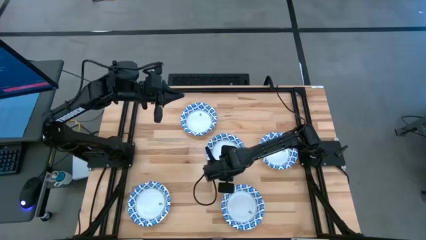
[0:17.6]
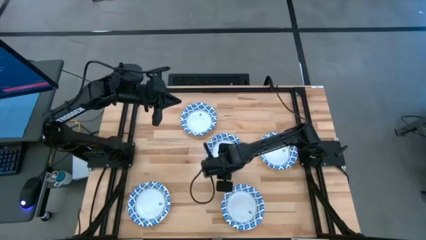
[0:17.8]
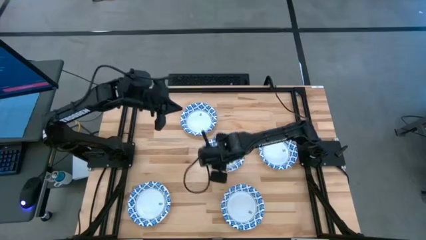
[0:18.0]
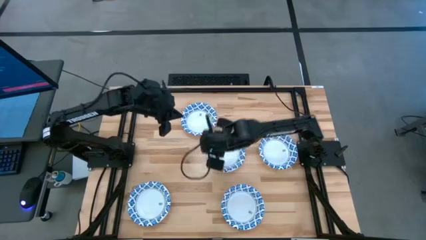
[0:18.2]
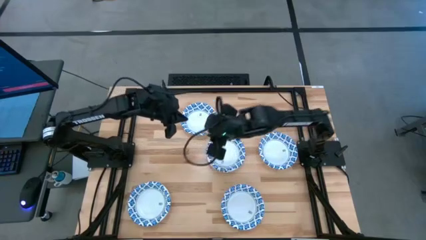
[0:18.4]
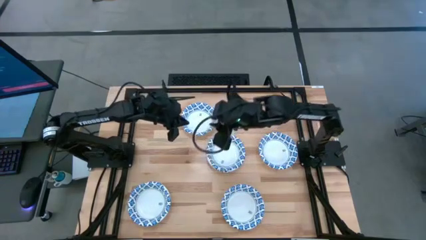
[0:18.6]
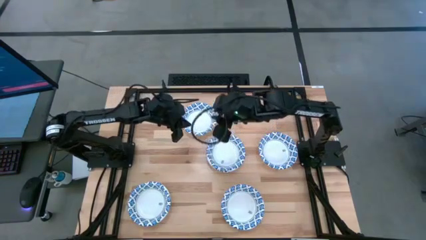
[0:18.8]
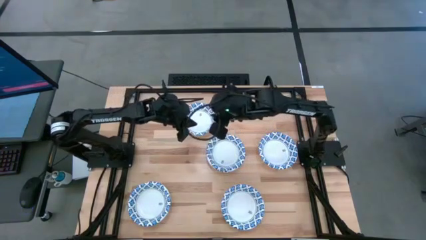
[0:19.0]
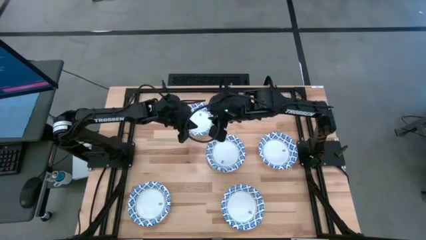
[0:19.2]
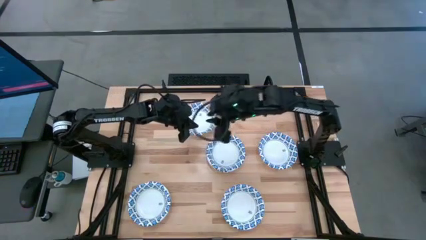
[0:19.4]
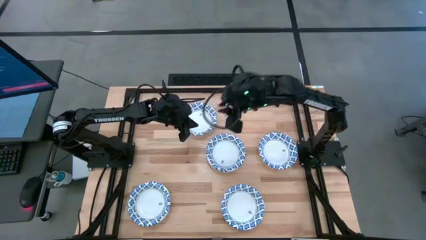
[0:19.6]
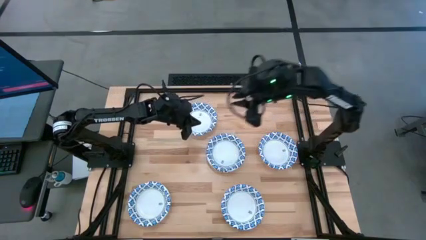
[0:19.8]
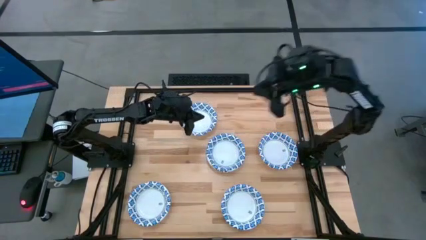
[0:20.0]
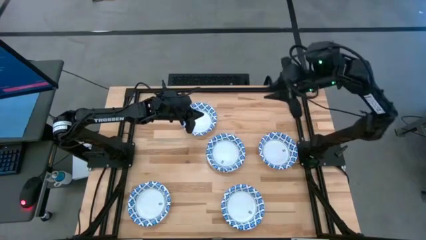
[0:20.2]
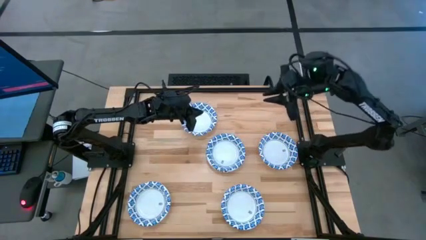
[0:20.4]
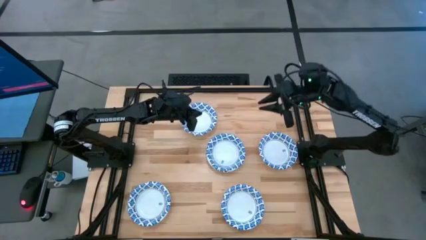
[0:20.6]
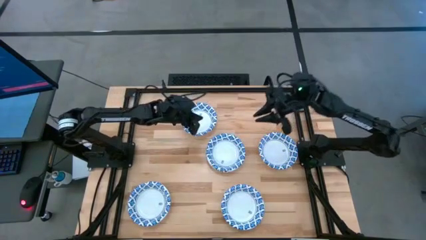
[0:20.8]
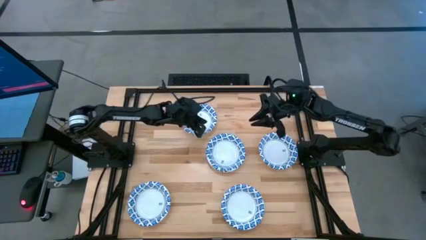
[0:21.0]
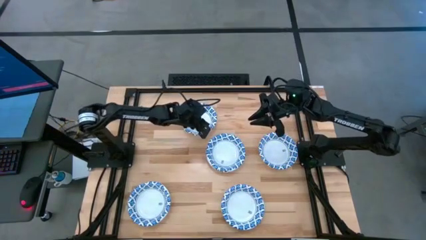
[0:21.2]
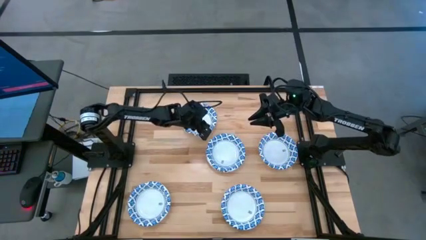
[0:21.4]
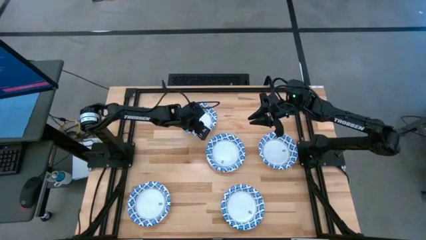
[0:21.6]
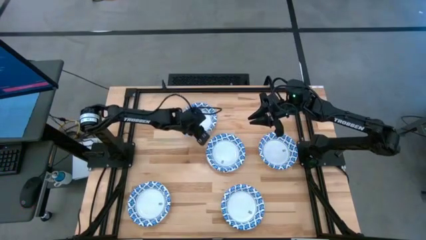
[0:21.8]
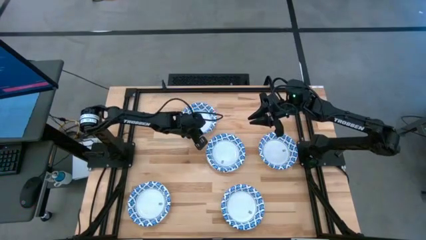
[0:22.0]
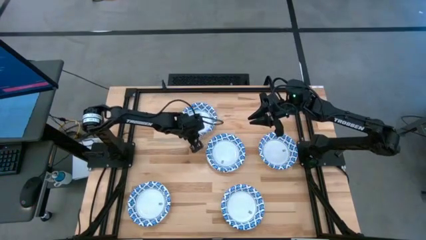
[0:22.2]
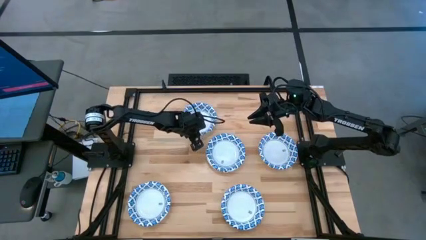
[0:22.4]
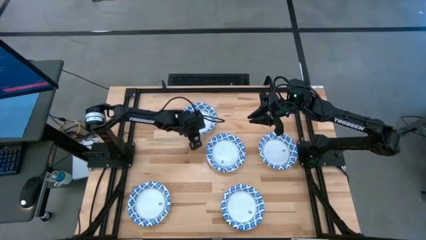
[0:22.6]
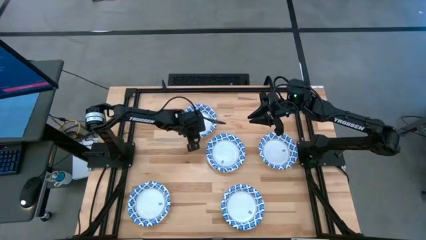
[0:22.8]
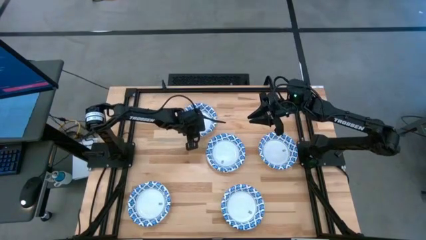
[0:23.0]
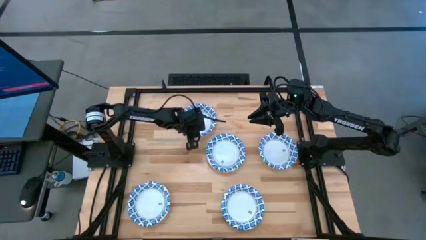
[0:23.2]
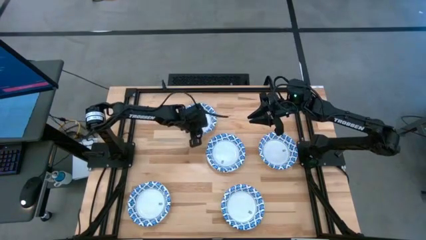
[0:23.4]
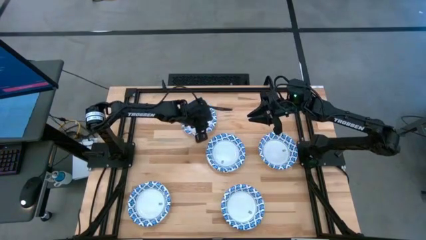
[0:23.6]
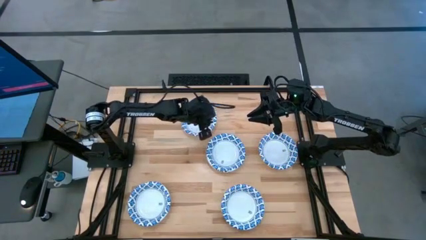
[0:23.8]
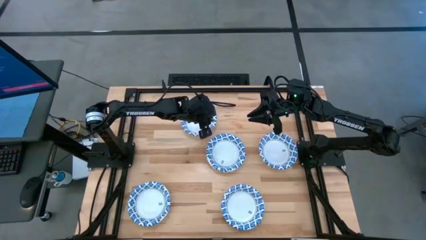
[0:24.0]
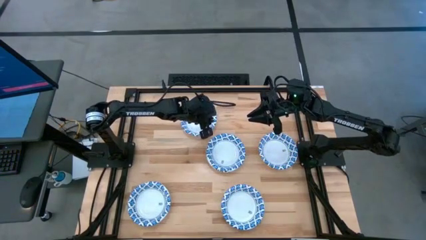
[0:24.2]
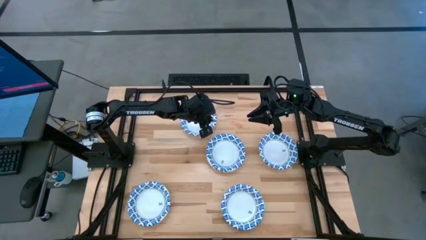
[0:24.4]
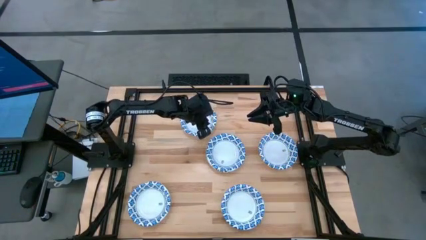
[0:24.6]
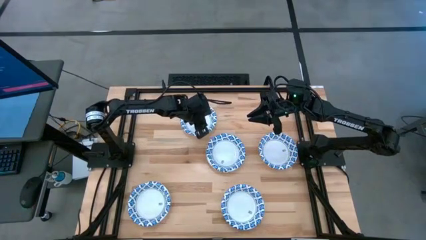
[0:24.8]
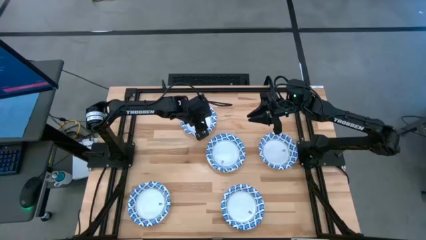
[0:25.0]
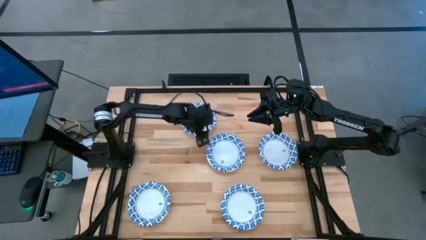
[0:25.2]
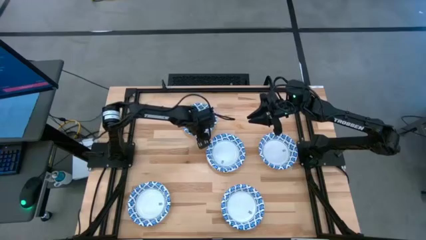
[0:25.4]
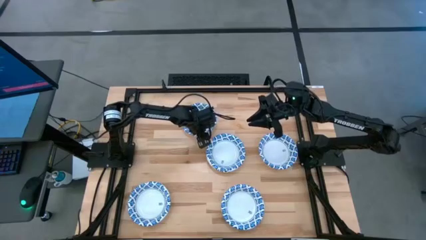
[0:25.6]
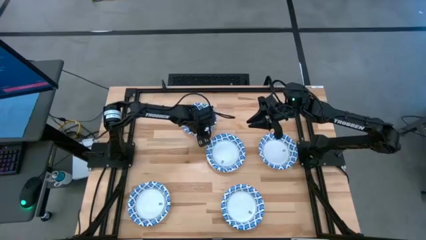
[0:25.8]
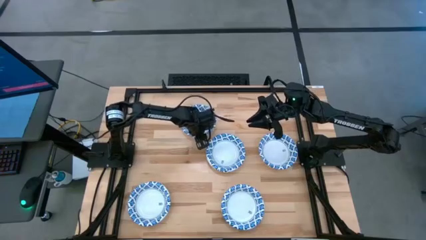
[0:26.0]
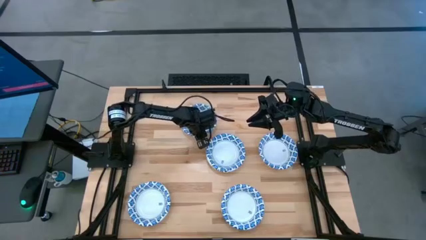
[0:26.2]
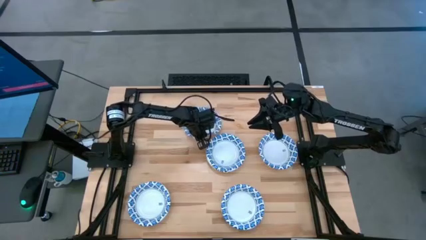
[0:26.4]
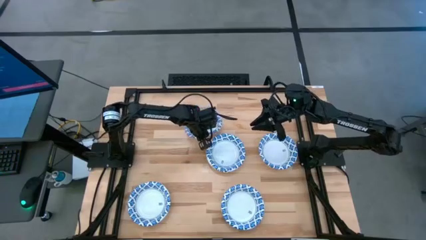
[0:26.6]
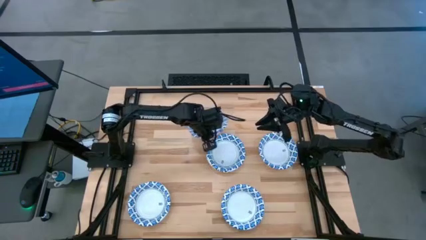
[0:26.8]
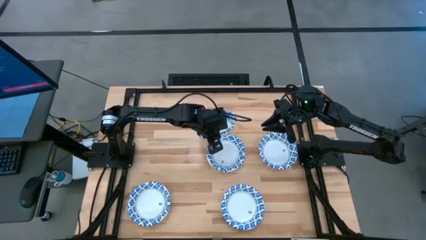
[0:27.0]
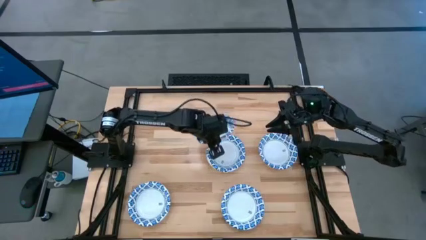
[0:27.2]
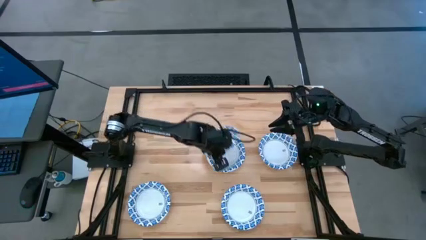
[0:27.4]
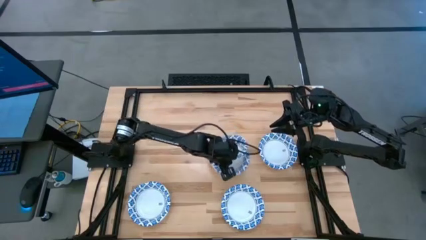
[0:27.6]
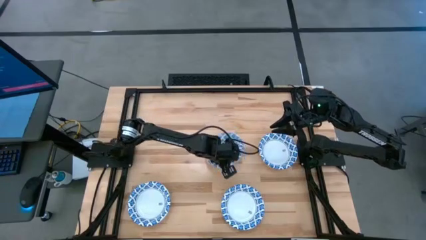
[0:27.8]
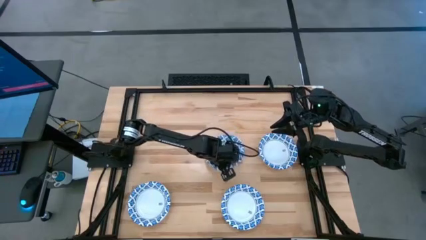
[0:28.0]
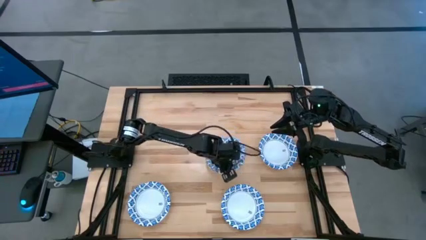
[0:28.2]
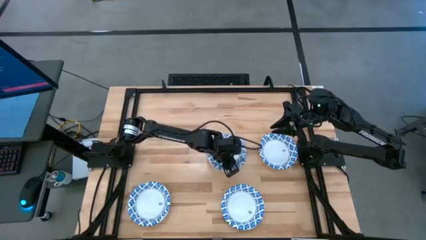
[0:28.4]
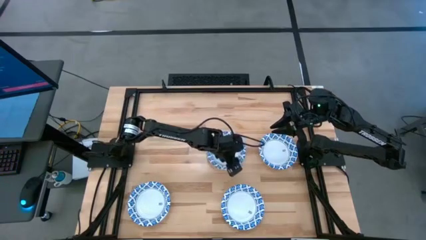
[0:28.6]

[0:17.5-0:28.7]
Task: Nest bowls inside each other
Stack the white bowl on top of the other white bowl
